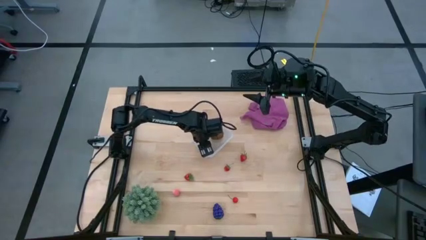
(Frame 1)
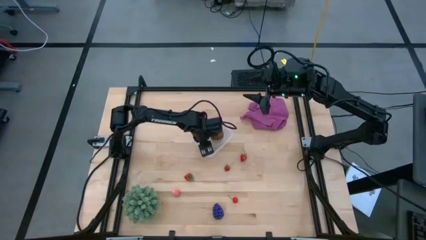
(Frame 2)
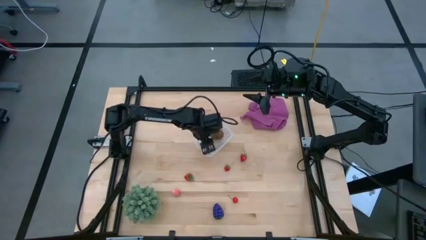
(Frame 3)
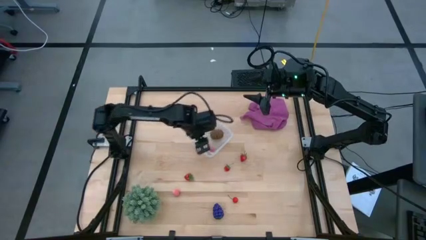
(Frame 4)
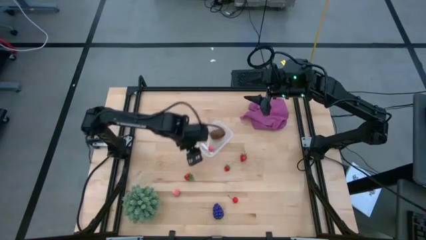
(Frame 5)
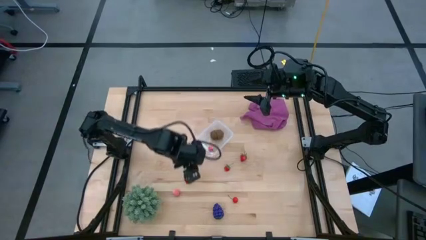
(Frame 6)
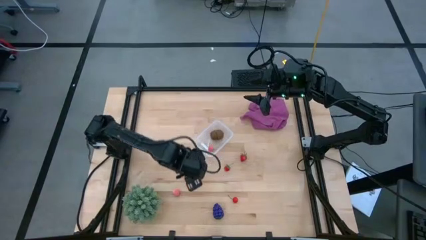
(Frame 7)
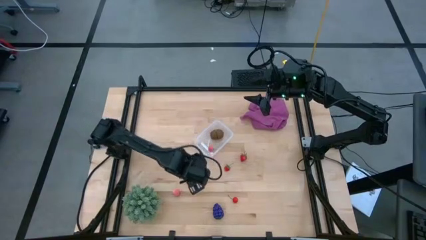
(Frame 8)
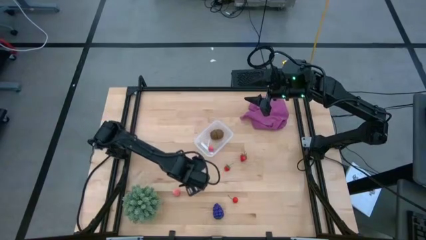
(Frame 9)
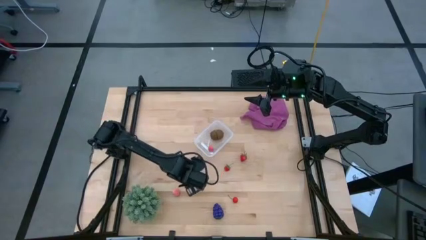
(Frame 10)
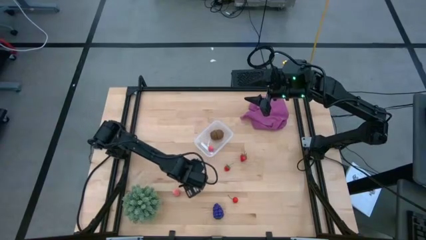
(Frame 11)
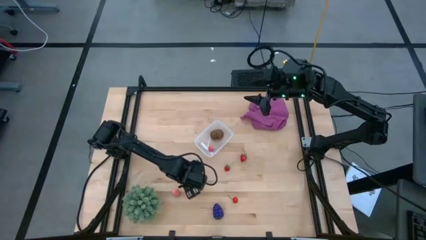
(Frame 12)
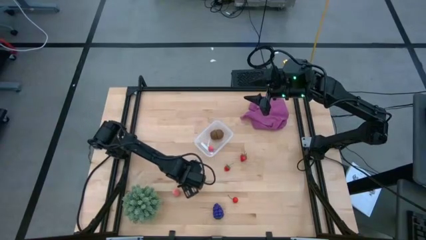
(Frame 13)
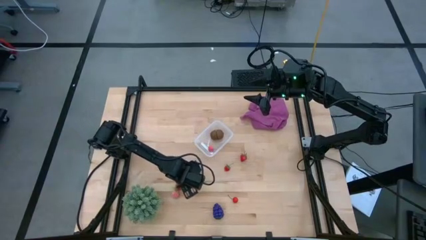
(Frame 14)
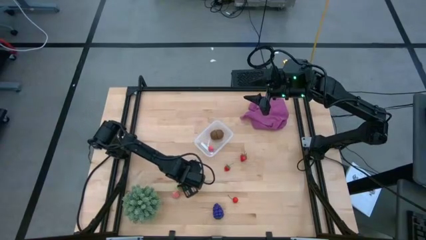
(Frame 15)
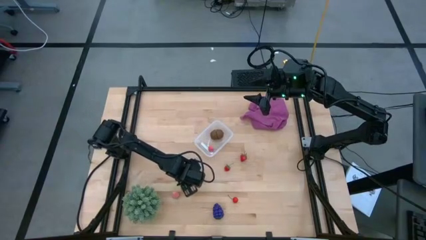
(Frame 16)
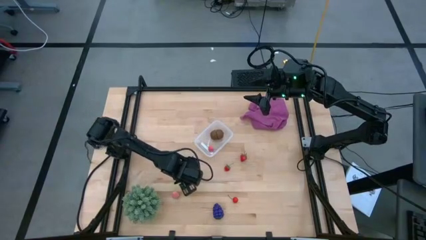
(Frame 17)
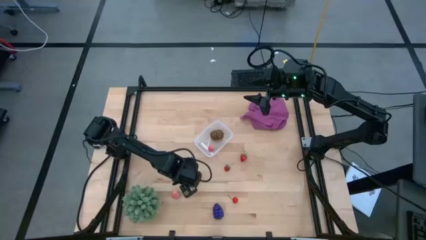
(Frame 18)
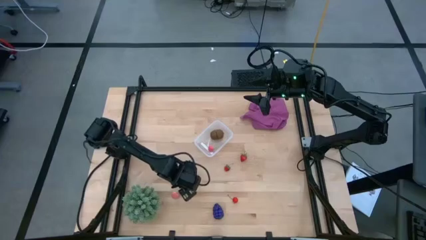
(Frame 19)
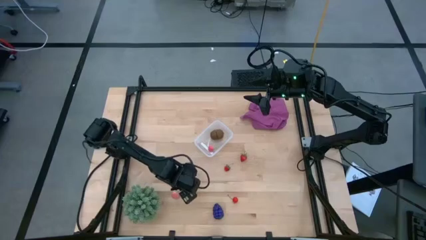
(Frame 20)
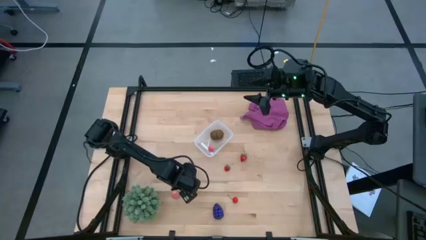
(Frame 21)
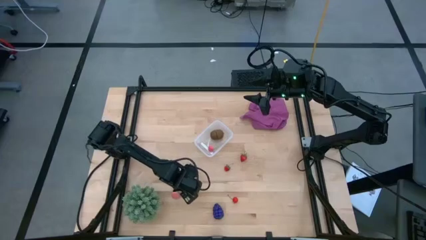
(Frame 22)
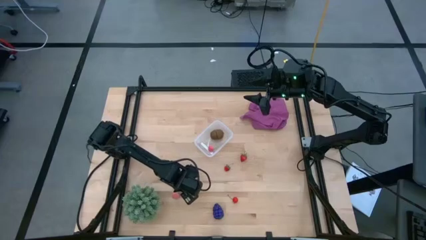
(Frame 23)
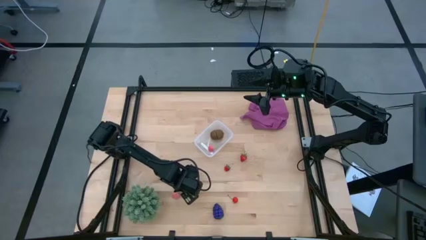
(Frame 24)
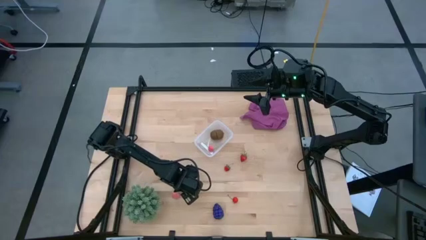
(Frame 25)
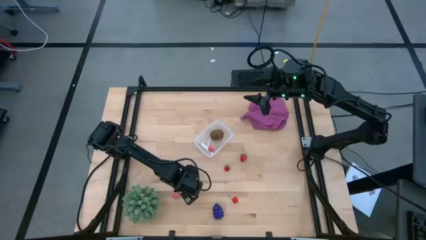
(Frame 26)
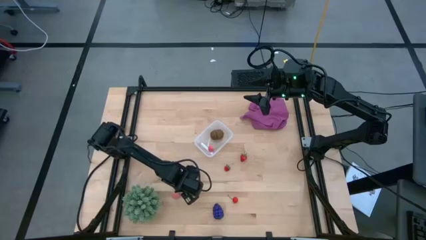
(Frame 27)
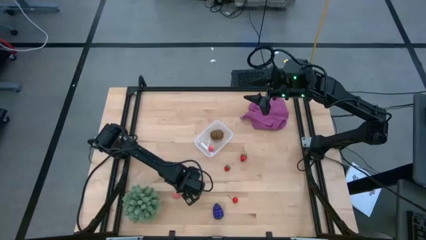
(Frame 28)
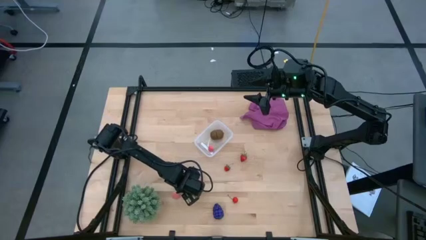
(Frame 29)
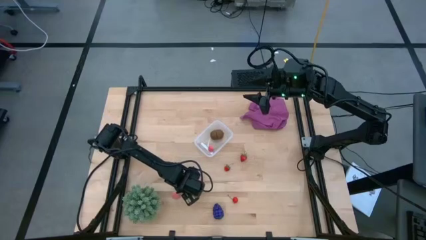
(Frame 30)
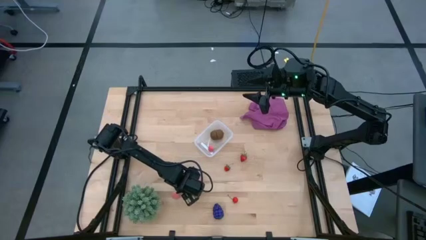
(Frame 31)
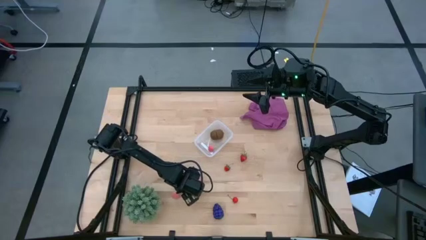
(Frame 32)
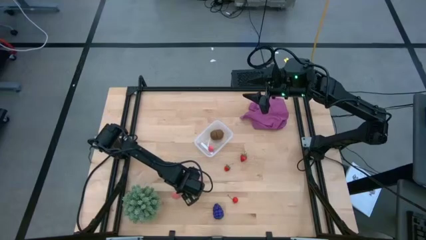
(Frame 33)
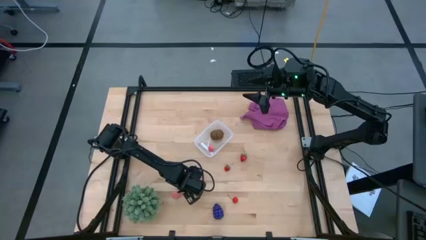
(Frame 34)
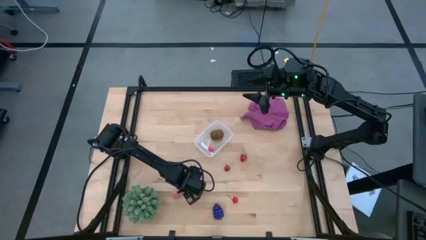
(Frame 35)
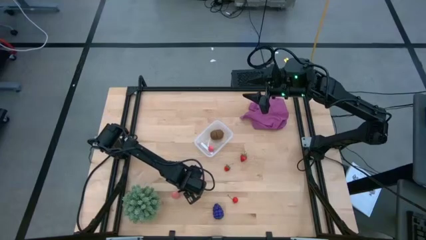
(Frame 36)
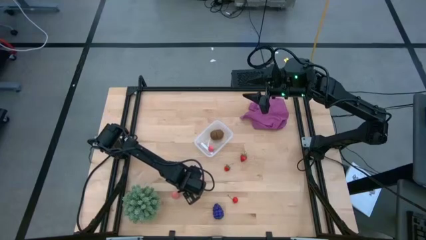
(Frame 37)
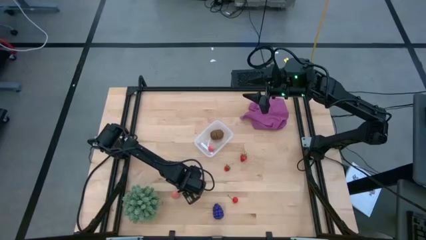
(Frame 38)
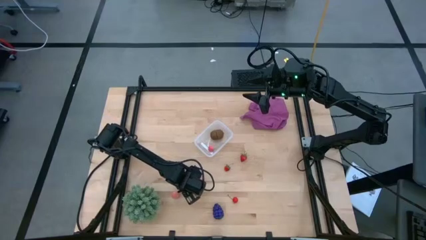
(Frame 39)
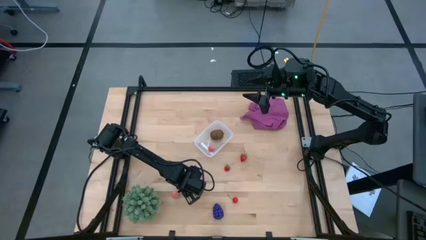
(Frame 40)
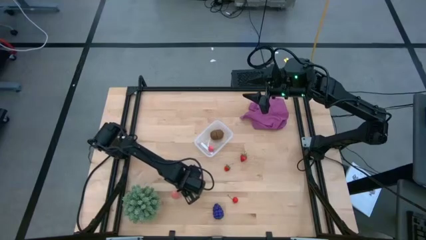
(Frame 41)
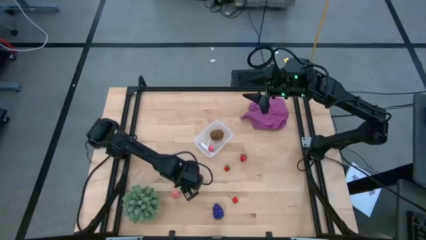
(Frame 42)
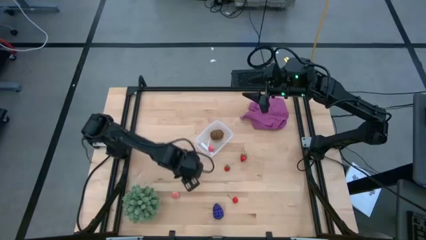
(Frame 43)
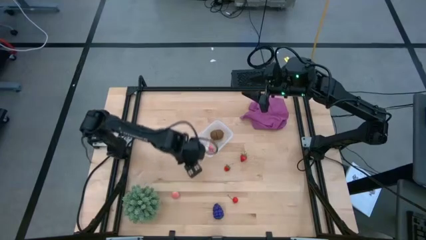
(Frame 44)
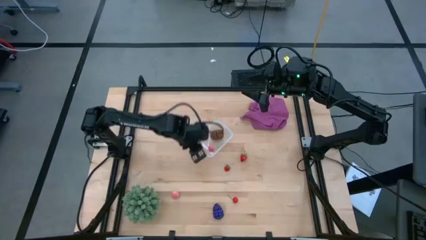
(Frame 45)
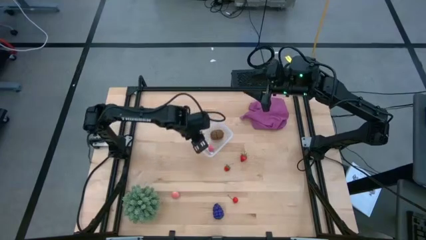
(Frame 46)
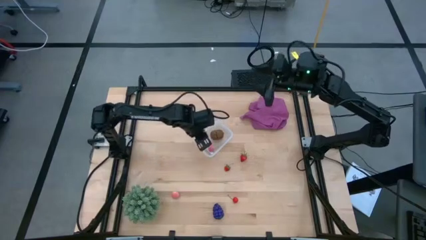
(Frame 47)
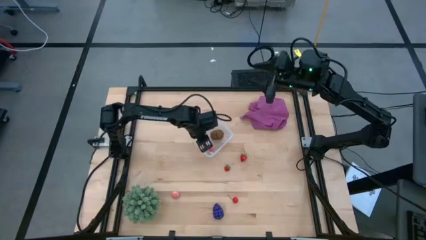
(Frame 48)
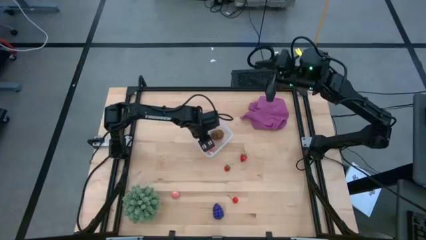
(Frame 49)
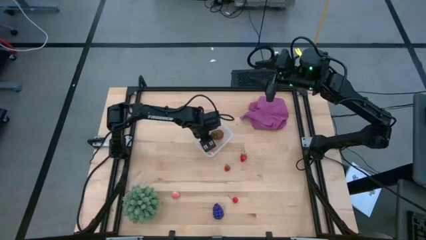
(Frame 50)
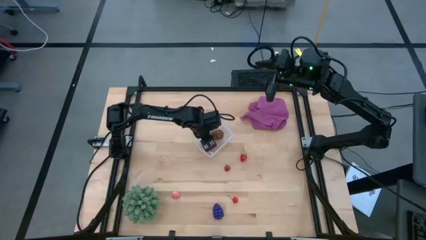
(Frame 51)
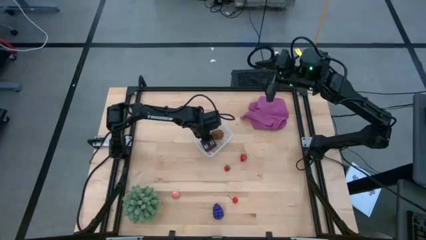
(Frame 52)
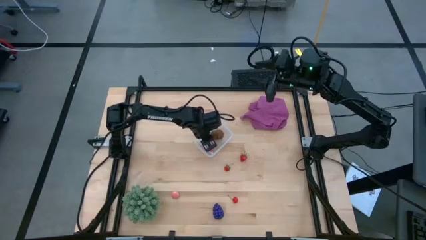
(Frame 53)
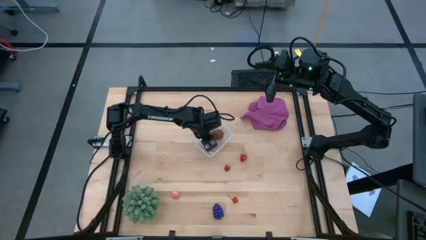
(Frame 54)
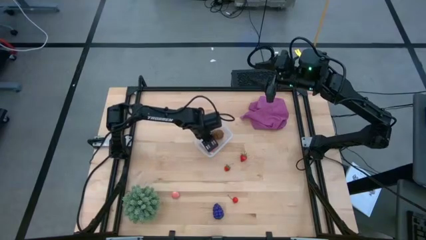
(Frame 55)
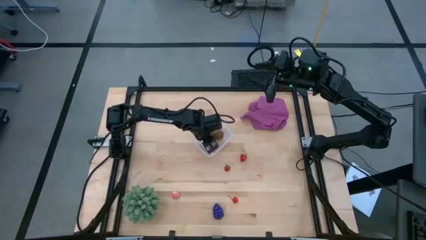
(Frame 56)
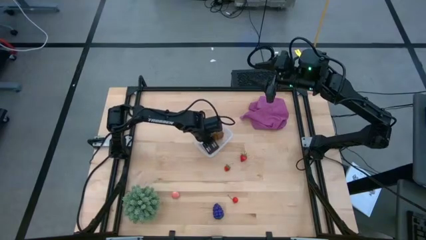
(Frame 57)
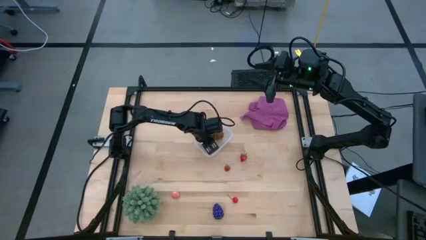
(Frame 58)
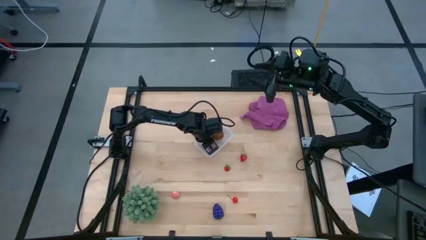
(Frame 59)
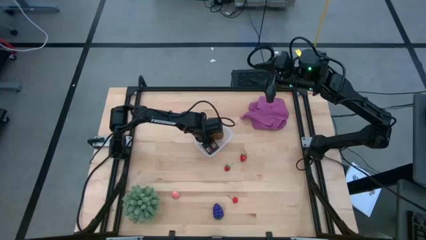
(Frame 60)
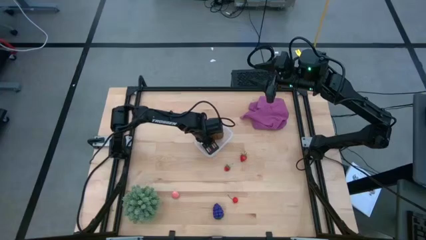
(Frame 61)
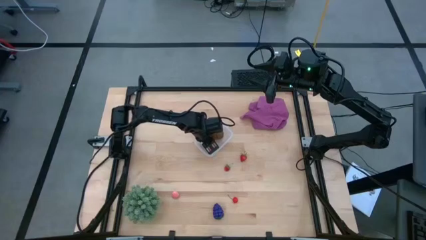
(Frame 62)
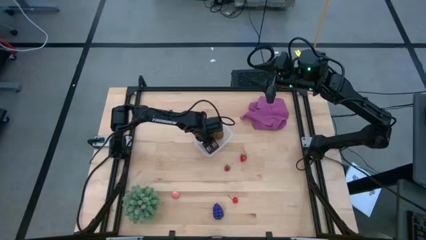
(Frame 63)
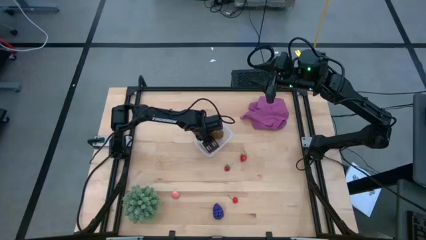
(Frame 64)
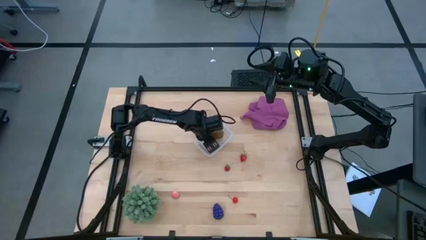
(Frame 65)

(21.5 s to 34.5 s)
Task: Pick and placing Produce into tupperware
Put the left strawberry into the transparent bin
